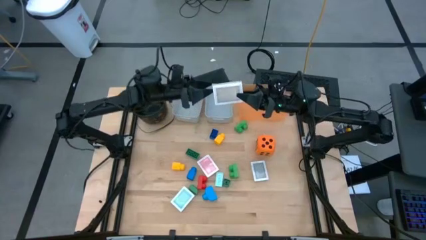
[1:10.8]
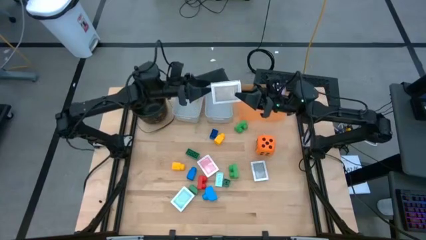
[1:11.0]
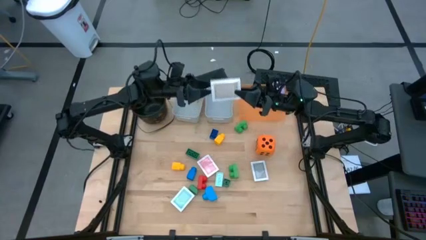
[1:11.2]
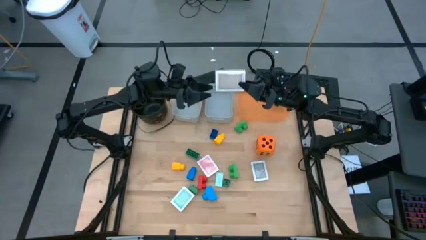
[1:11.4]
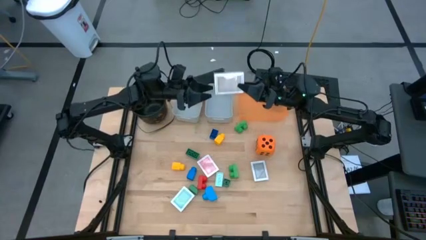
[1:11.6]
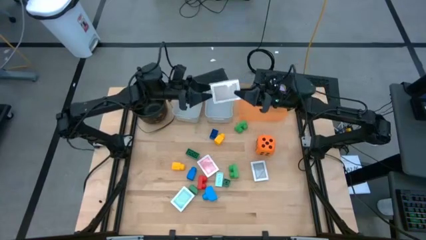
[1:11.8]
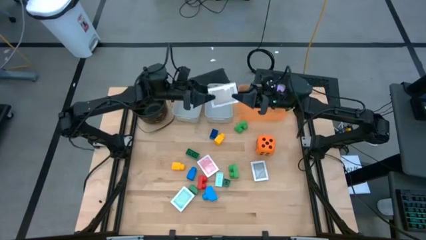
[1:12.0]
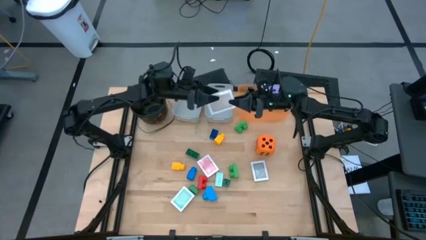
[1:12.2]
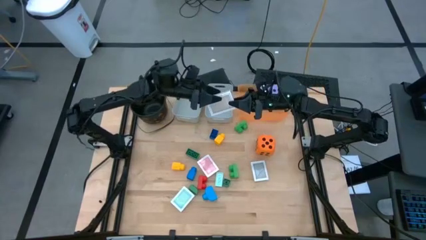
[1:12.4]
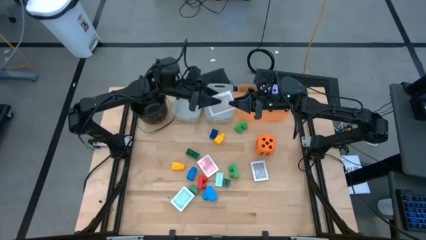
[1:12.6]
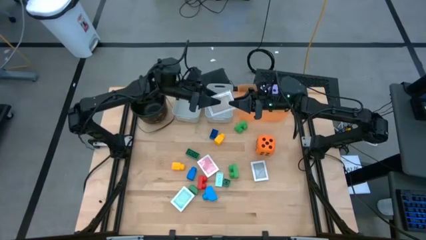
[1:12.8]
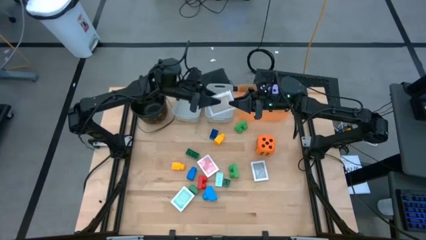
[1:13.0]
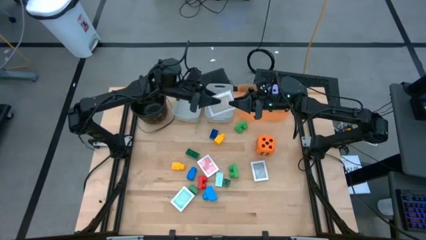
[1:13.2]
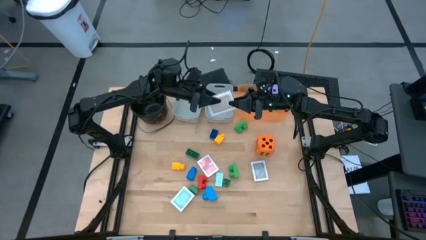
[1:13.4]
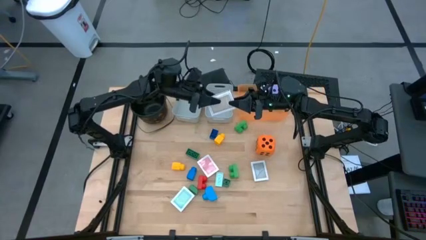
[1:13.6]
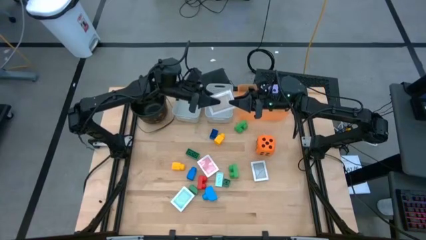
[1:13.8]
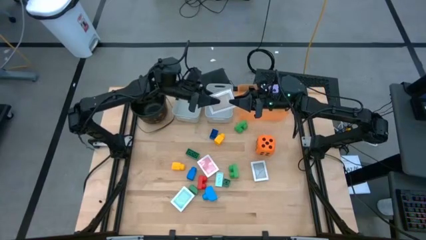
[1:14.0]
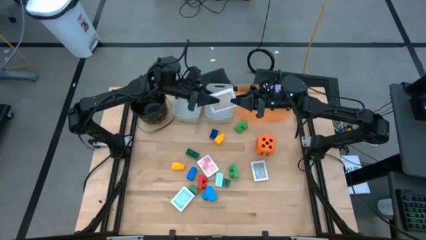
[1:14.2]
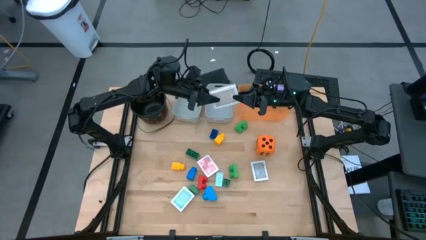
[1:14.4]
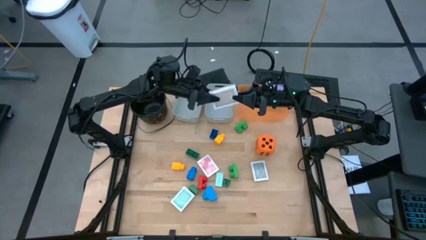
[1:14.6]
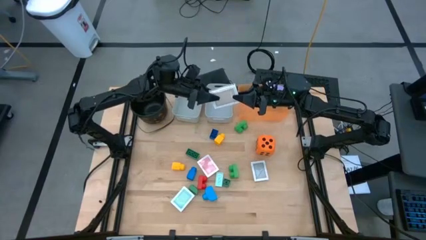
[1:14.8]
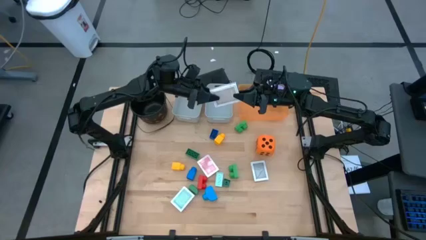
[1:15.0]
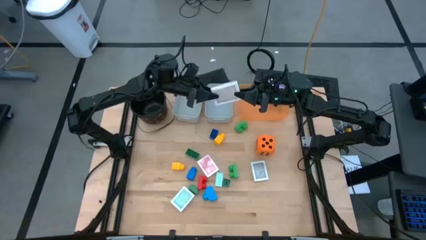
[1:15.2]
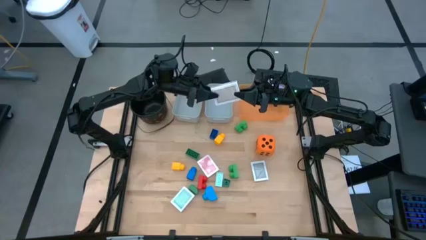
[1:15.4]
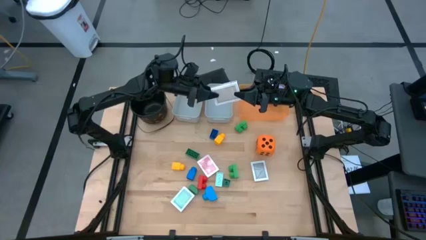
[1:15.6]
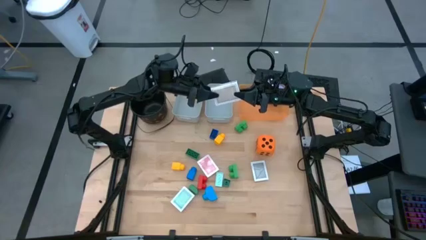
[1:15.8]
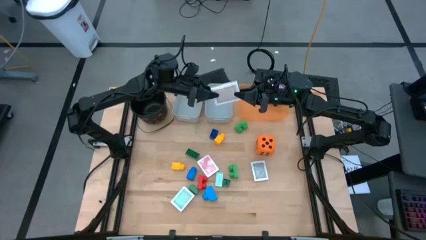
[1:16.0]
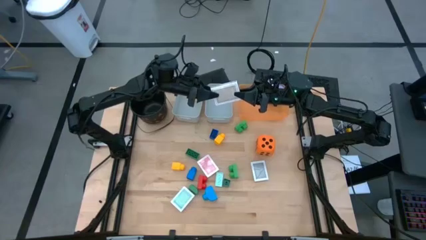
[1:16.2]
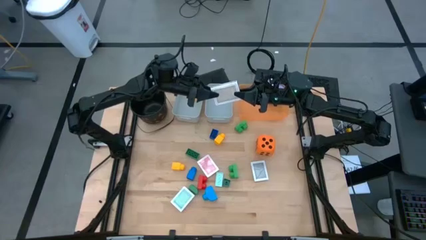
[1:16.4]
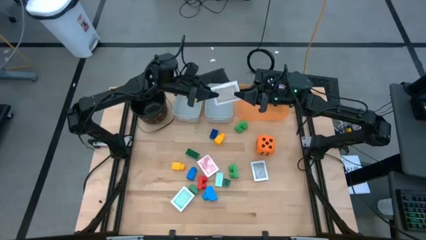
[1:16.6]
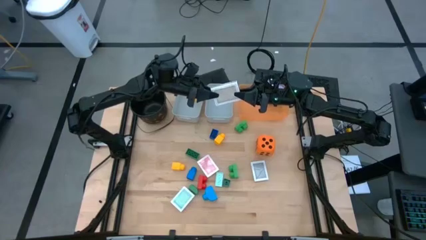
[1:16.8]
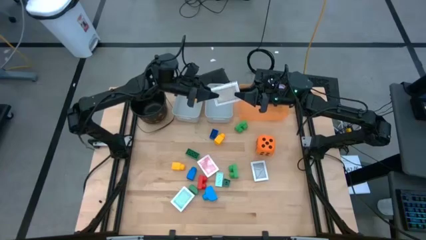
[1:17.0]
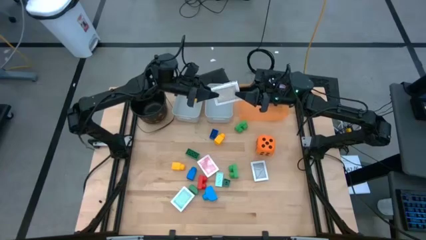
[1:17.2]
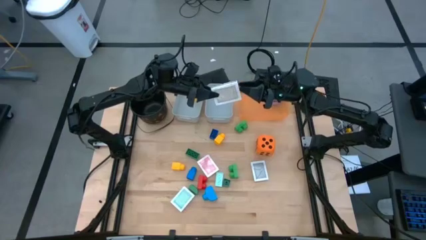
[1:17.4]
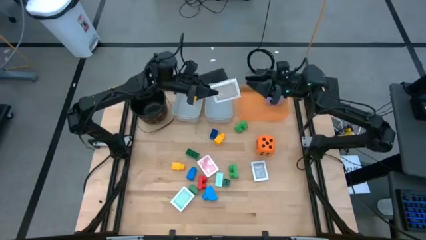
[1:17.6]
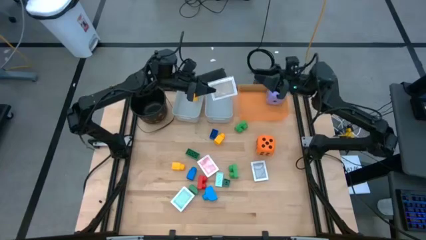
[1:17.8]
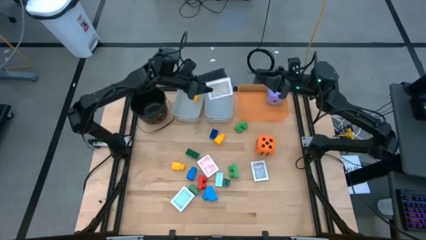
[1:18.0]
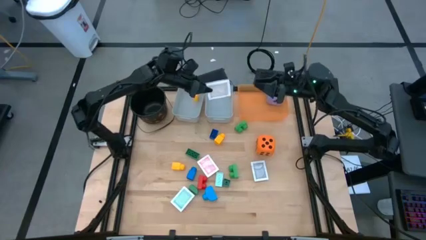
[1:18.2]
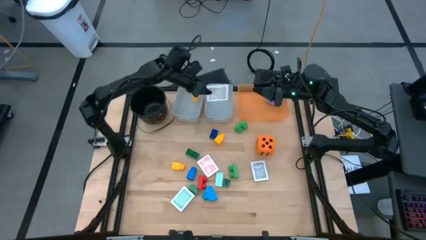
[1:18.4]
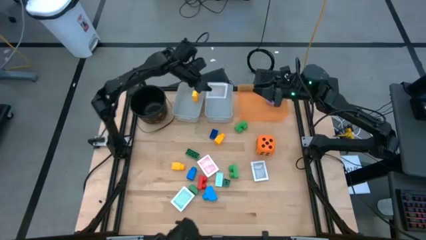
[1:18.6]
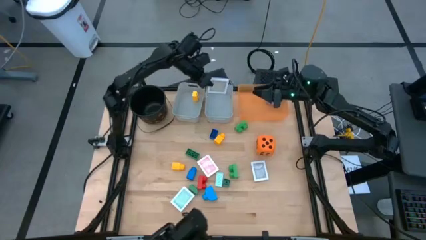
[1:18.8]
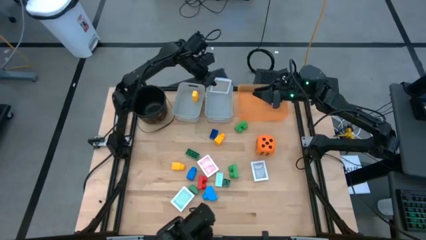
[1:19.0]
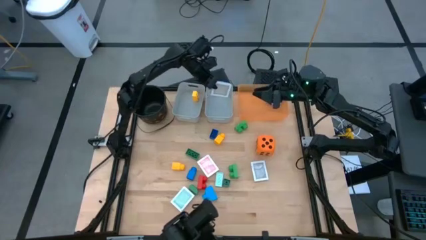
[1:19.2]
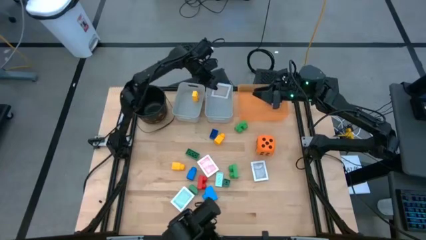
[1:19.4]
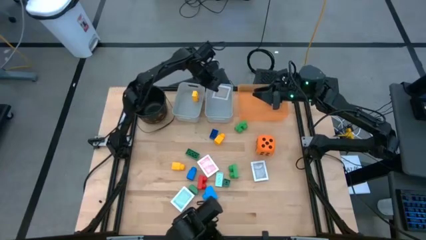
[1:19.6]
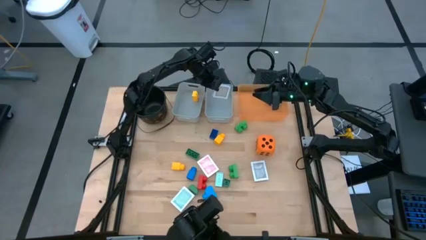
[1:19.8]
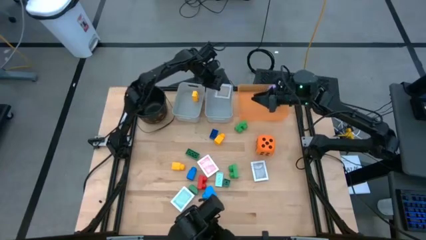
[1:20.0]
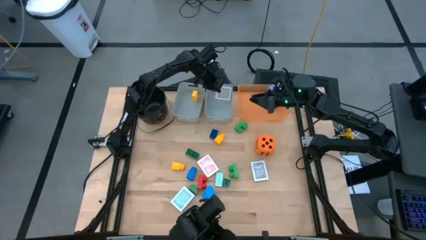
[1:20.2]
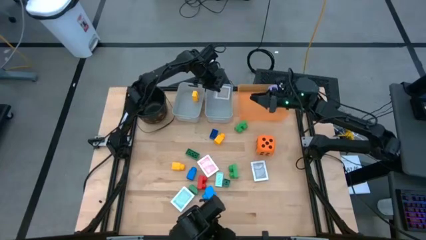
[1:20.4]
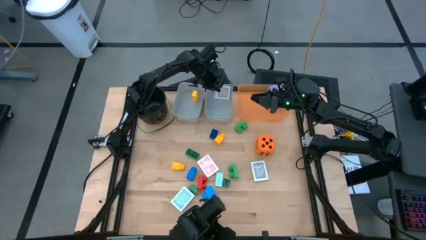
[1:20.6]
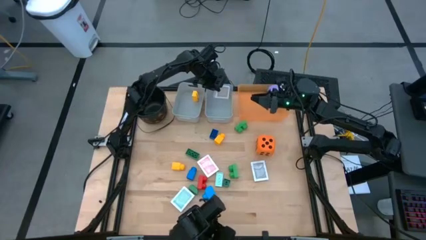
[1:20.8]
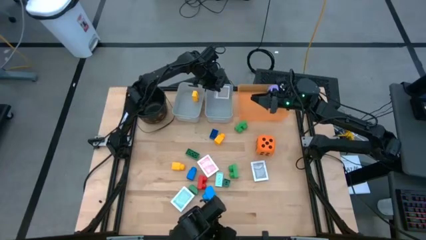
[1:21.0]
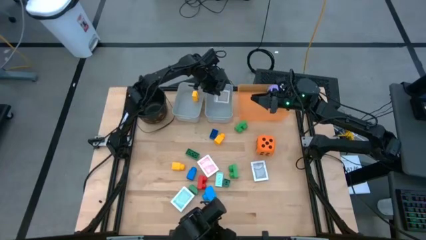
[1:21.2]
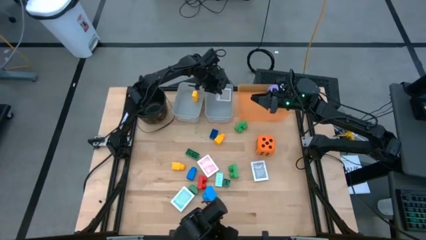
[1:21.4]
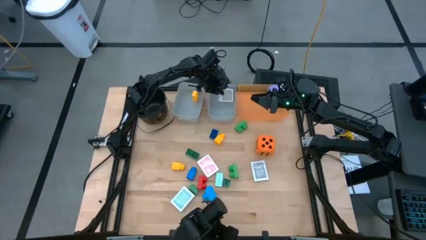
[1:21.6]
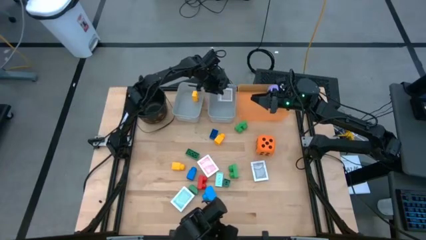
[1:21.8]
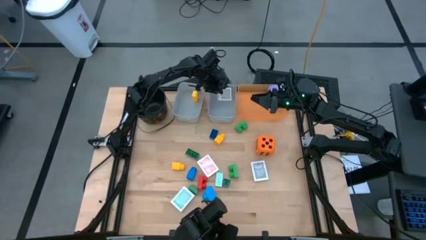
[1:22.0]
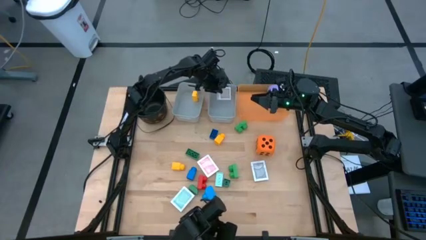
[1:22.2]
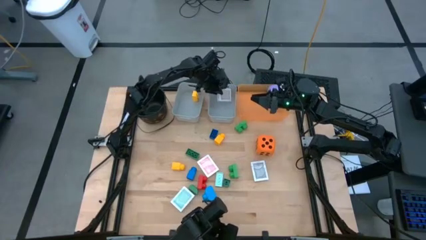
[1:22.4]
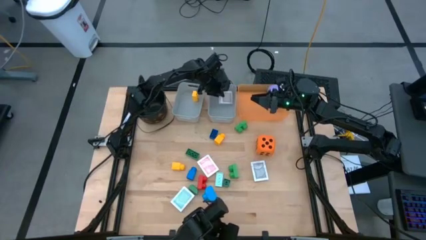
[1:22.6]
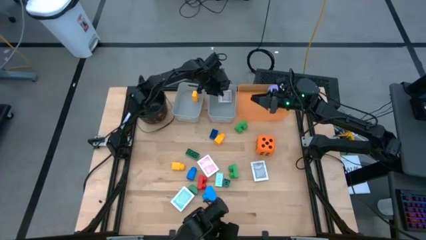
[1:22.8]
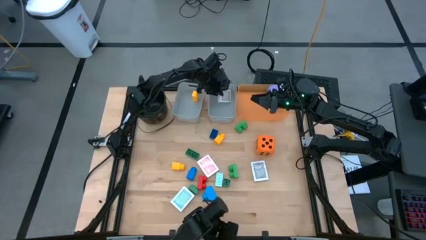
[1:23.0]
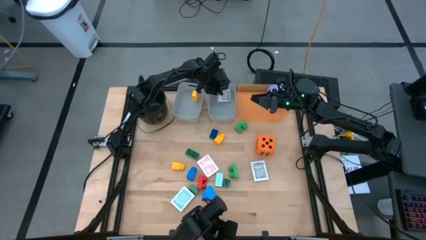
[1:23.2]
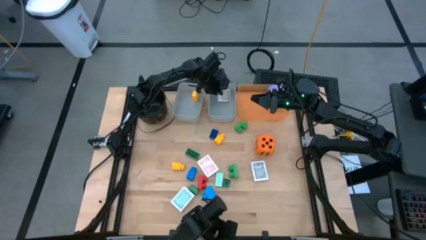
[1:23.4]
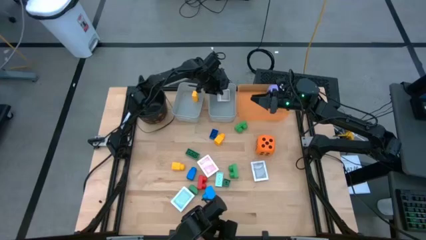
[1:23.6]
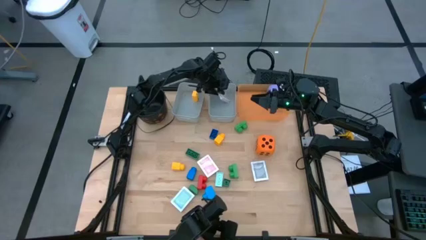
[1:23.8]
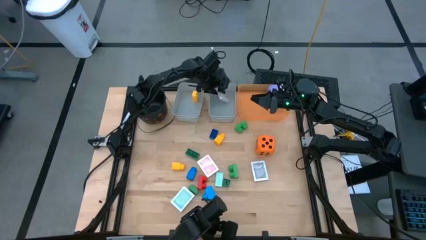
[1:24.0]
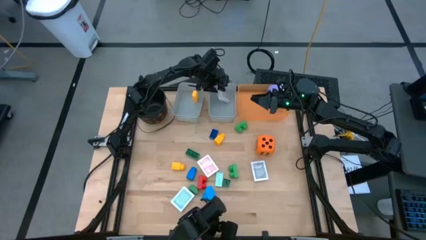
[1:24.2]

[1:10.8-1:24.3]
Task: Pick & Place Toys
Put the brown deck of cards into the right gray bin
